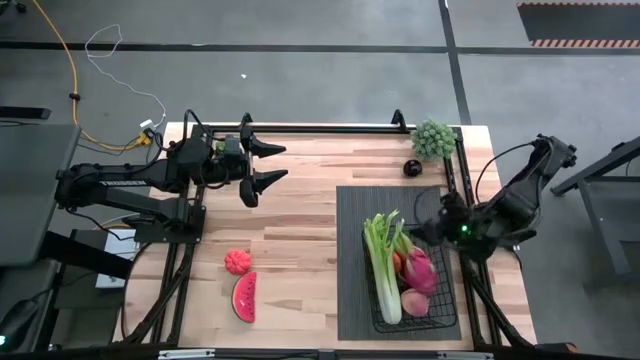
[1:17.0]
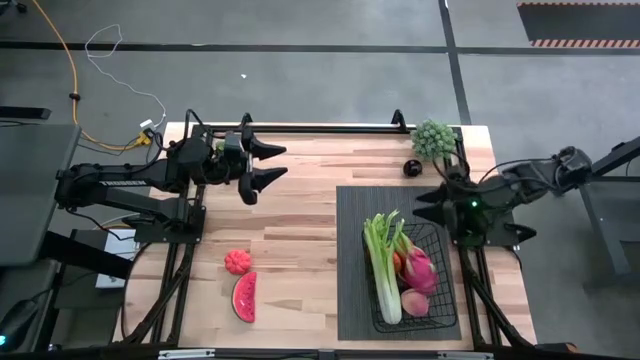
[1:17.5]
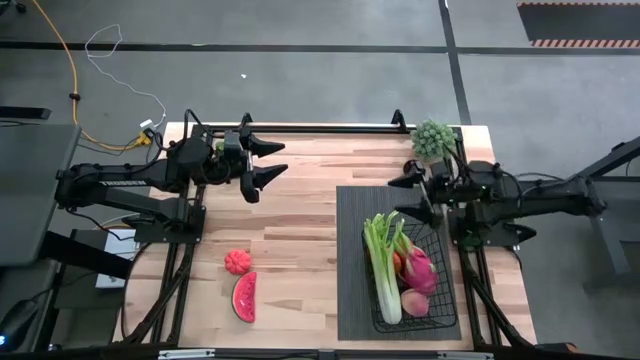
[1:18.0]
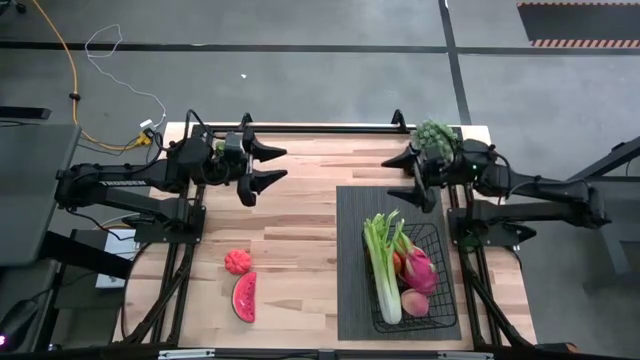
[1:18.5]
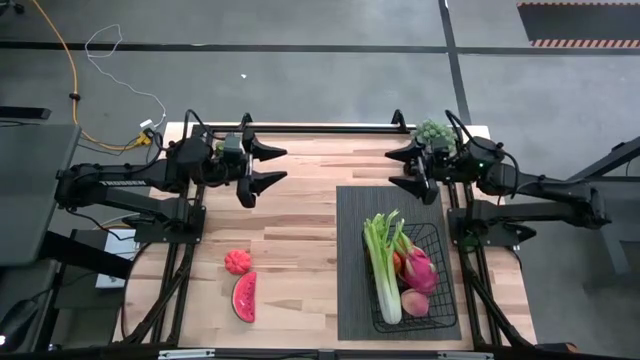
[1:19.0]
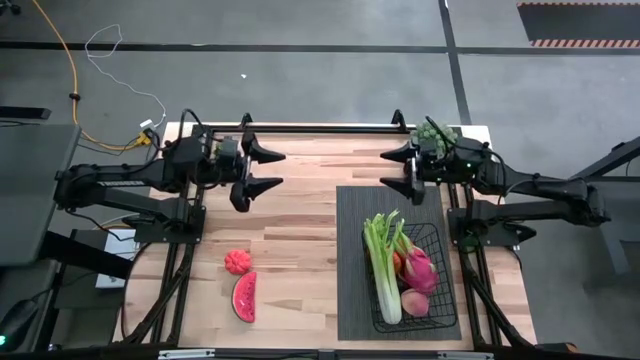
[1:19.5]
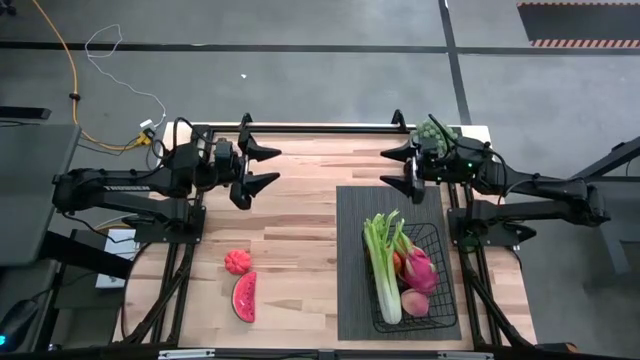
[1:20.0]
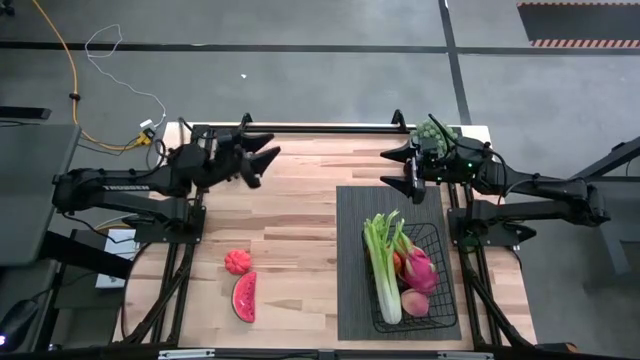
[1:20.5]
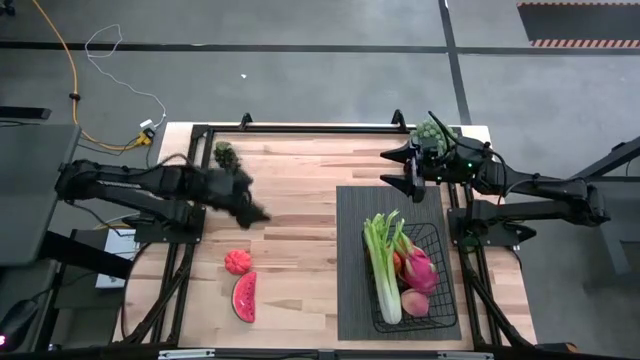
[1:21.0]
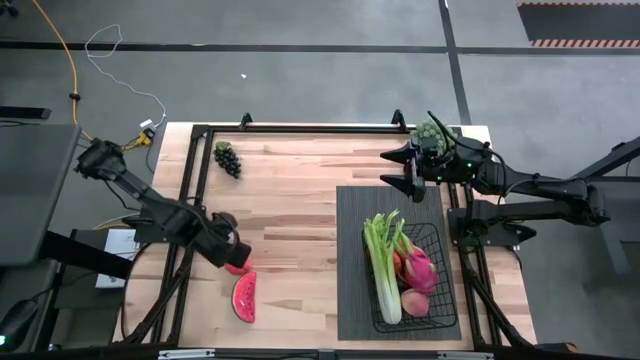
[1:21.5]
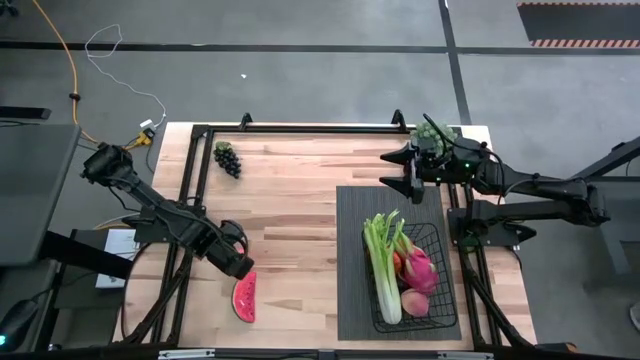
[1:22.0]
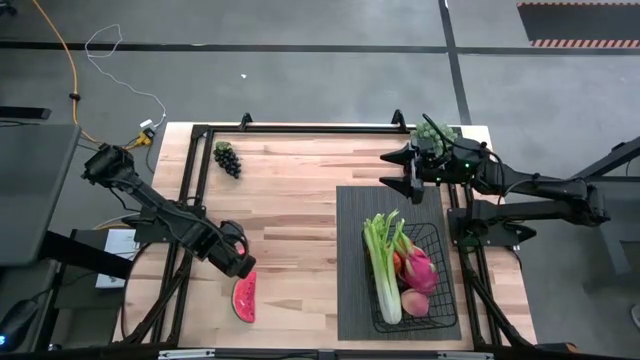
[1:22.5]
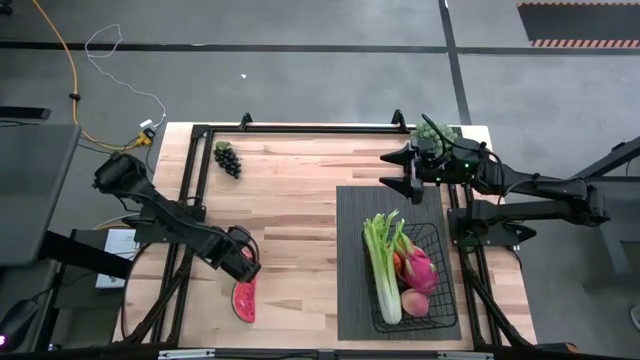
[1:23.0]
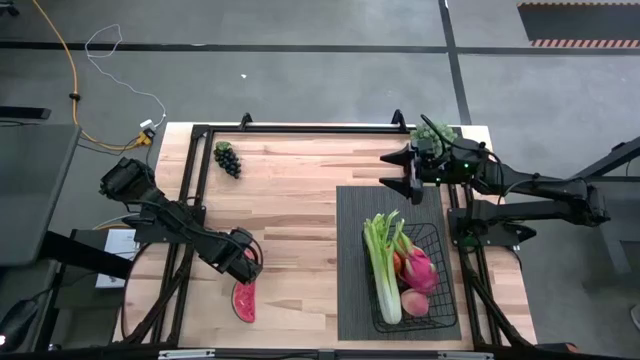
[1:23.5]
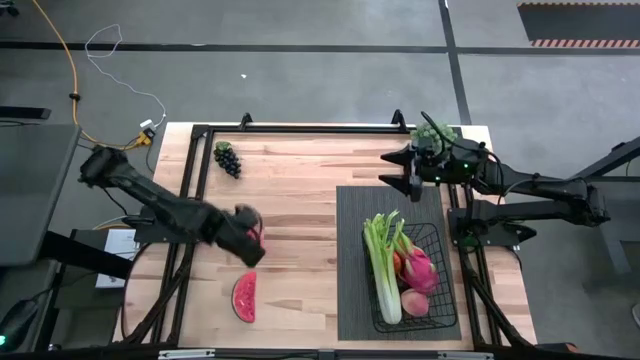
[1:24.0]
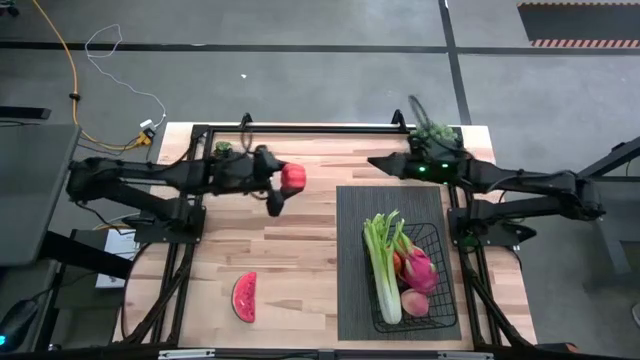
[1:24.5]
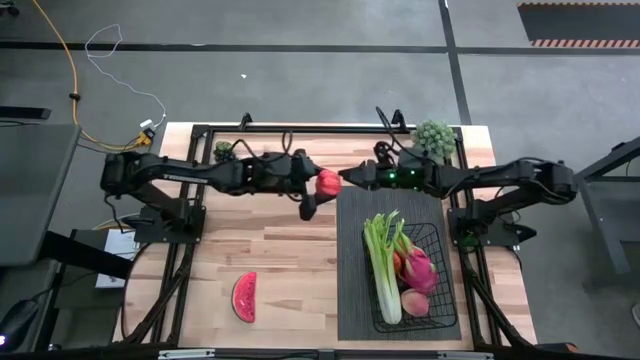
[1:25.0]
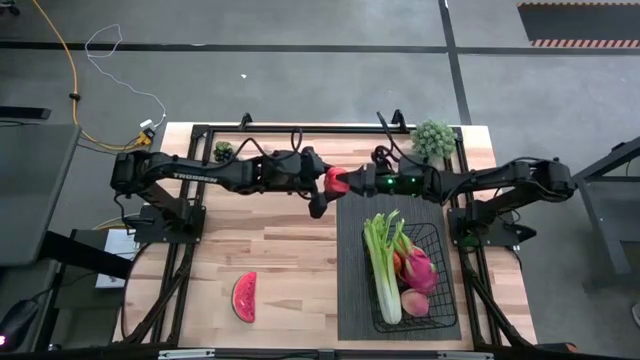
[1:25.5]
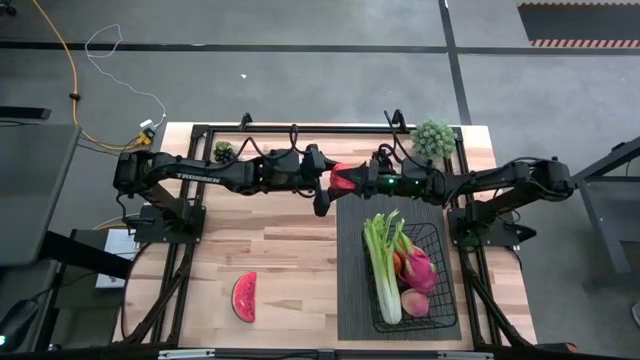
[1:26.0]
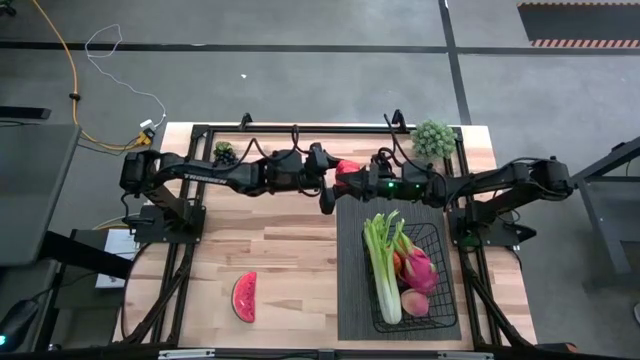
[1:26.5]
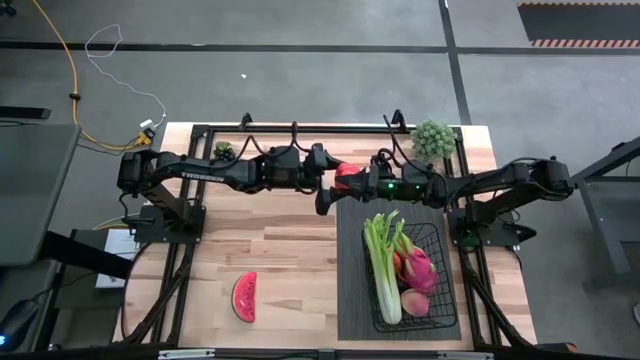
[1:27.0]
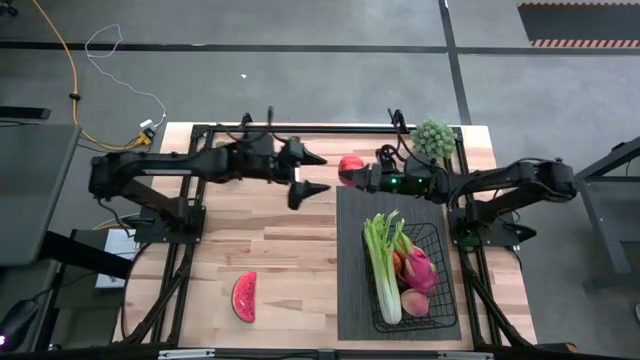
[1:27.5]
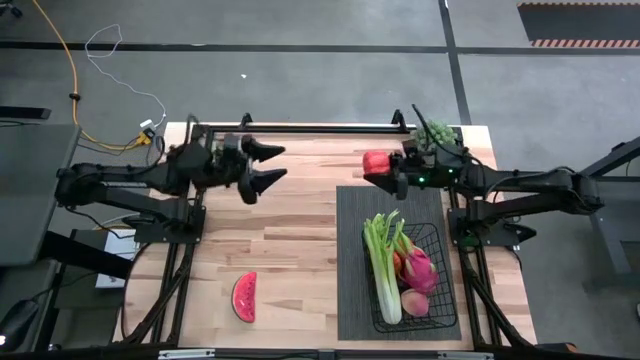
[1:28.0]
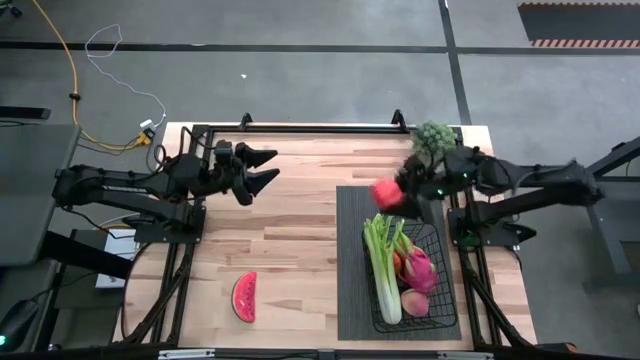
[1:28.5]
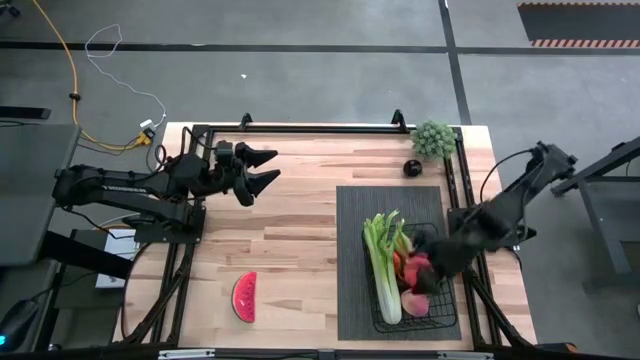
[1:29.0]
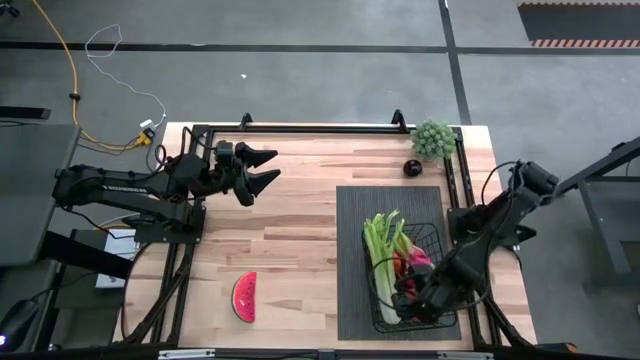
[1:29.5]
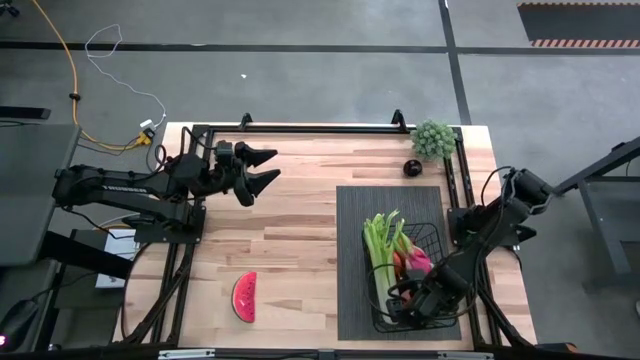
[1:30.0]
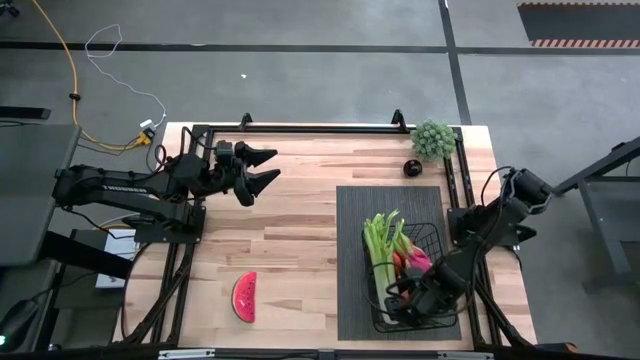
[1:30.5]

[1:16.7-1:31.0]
Task: Build produce basket
Put the squash into the black wire basket

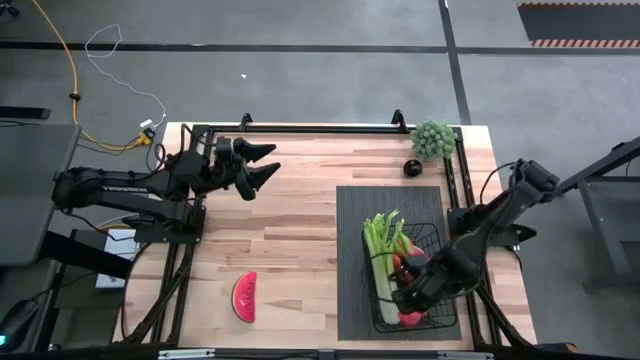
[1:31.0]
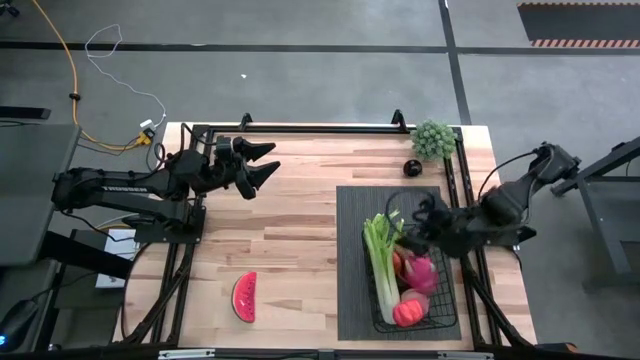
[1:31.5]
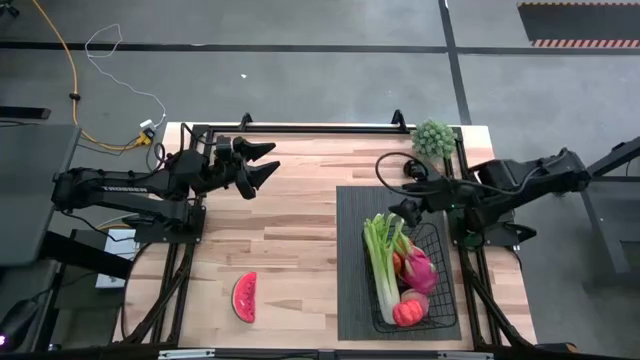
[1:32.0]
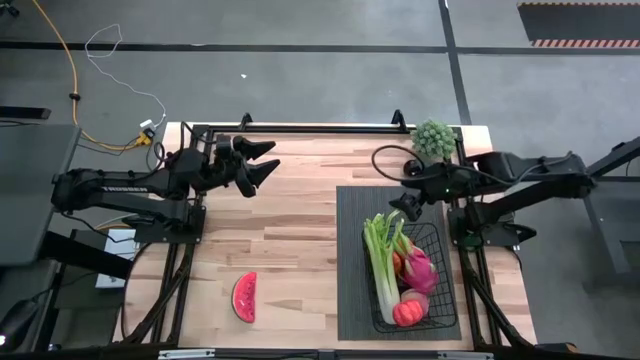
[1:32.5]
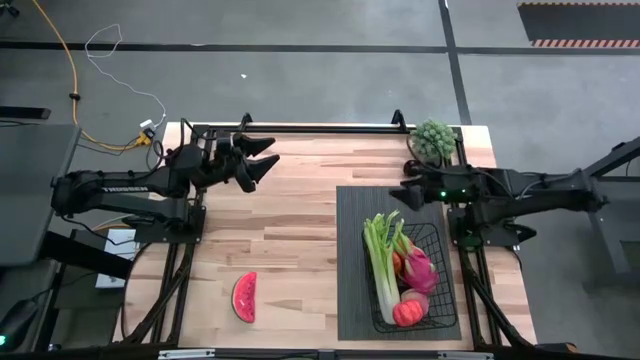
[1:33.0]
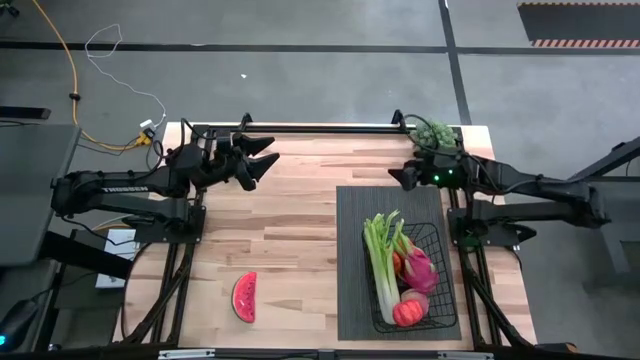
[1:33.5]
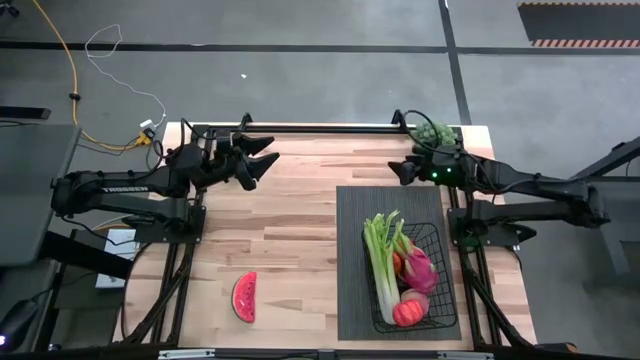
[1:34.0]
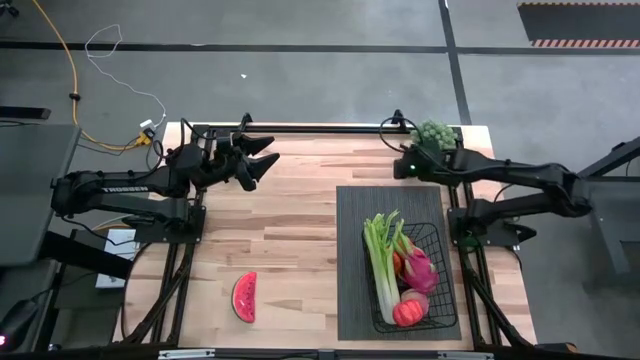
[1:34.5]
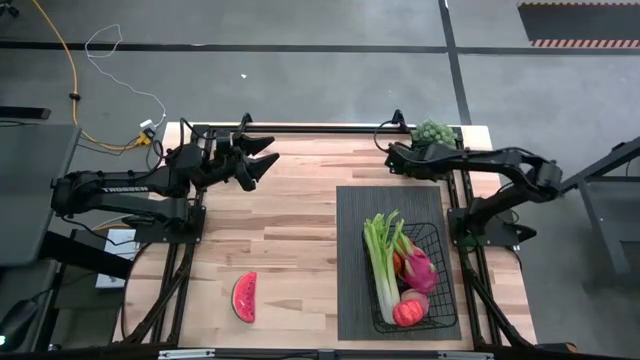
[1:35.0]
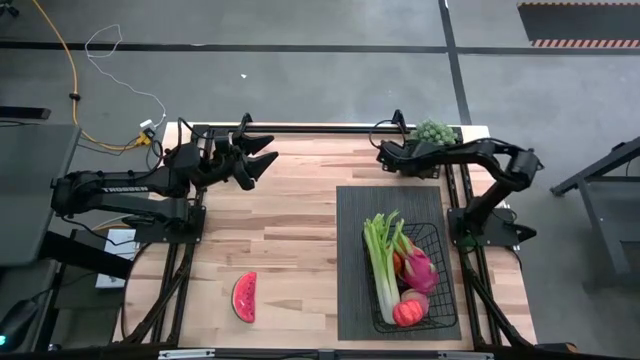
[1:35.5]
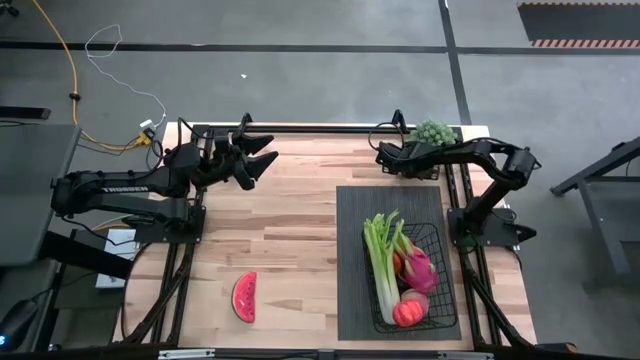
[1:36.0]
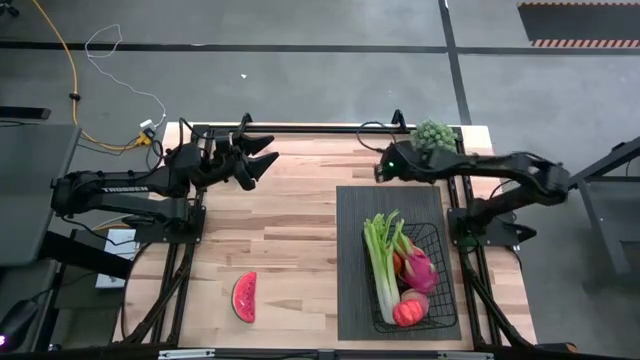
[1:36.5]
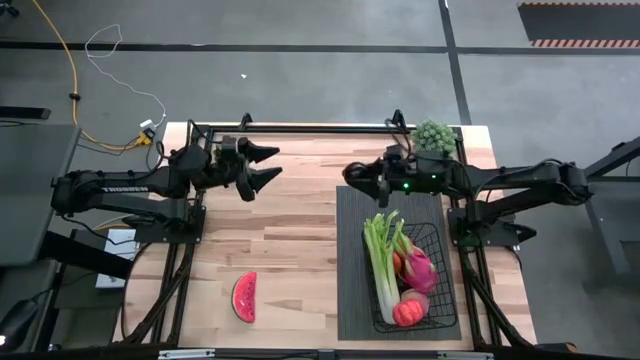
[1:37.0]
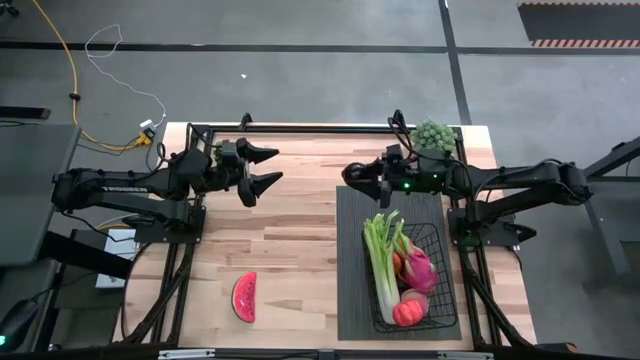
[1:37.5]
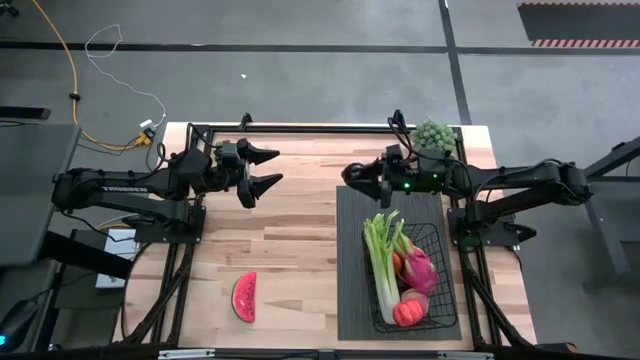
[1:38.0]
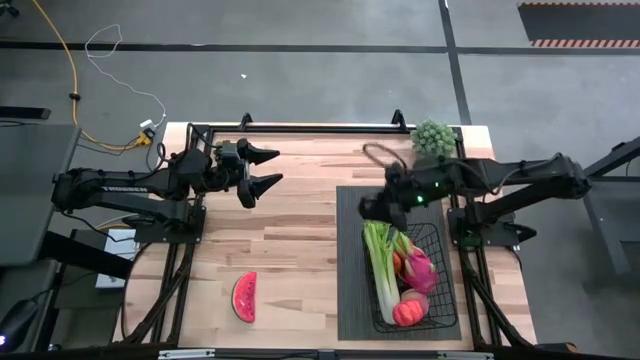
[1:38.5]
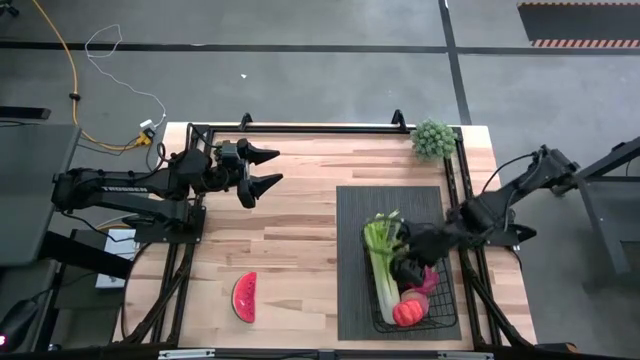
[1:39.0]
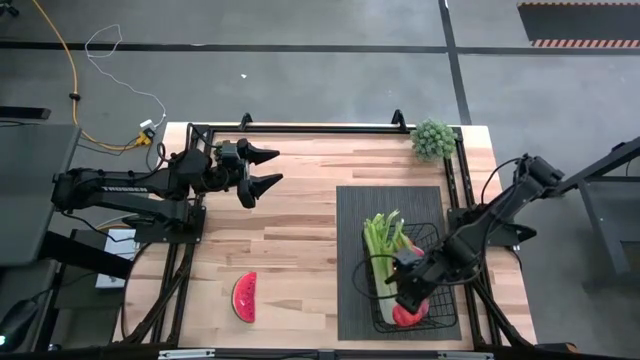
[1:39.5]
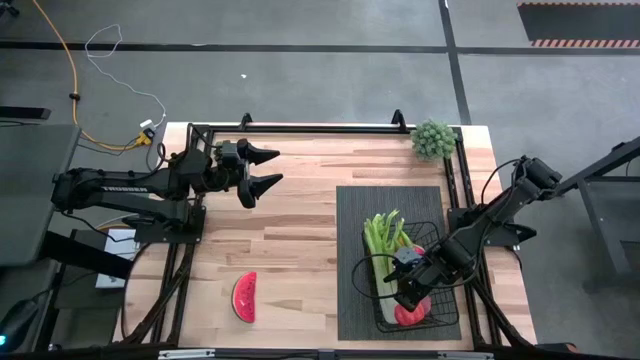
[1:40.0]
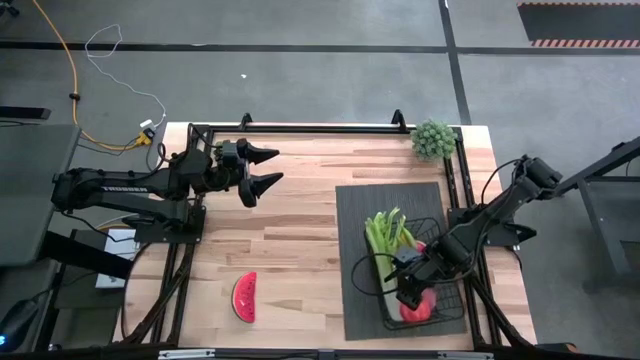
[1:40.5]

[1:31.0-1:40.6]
Put the plum into the black wire basket
